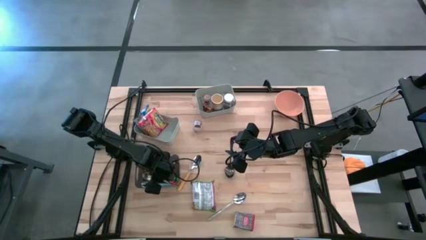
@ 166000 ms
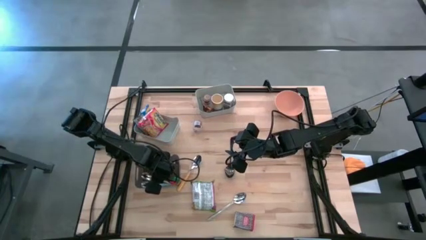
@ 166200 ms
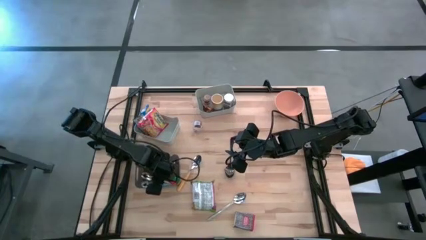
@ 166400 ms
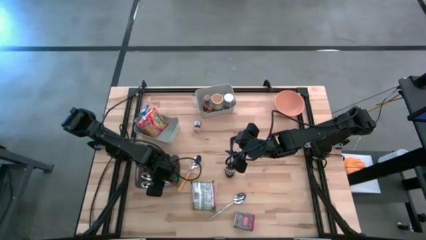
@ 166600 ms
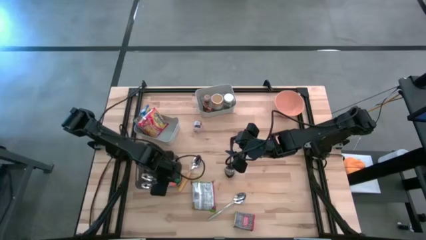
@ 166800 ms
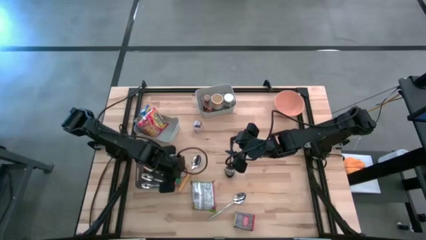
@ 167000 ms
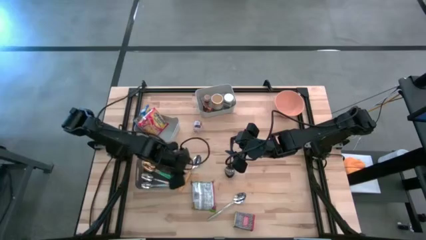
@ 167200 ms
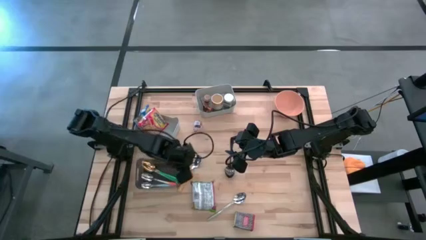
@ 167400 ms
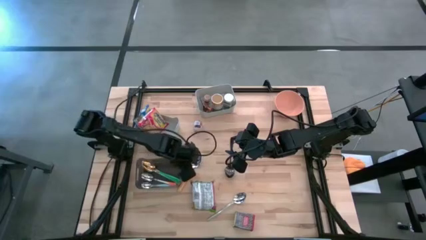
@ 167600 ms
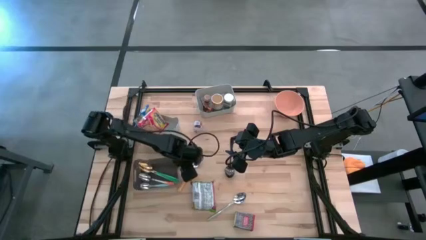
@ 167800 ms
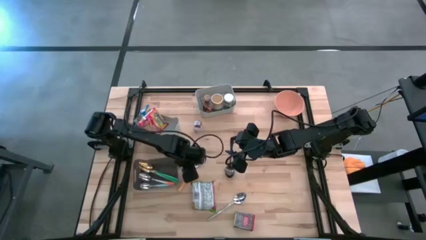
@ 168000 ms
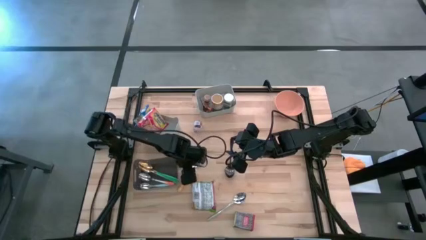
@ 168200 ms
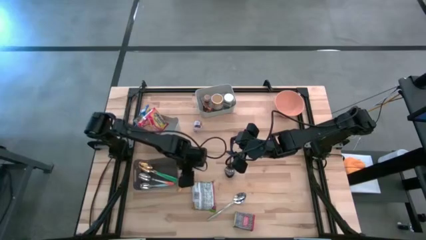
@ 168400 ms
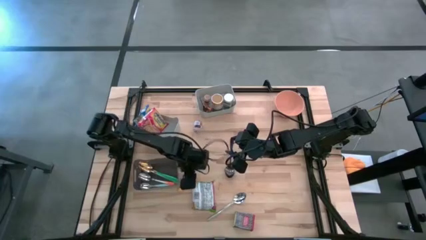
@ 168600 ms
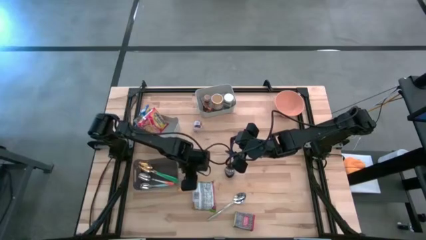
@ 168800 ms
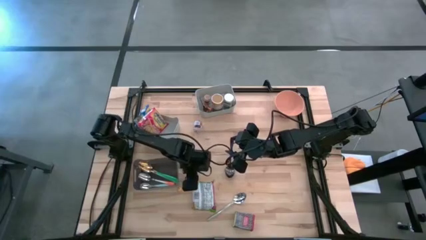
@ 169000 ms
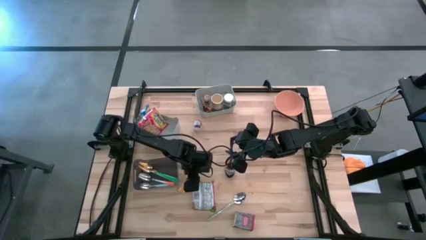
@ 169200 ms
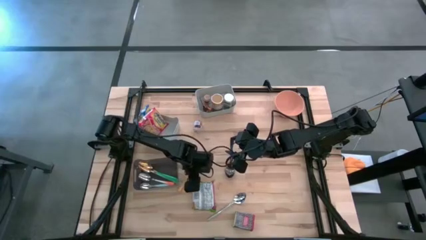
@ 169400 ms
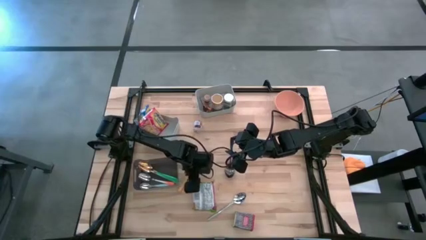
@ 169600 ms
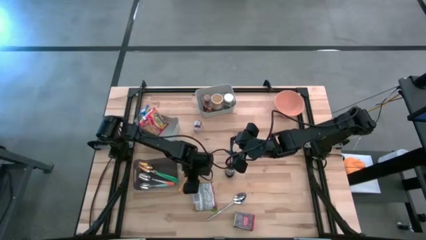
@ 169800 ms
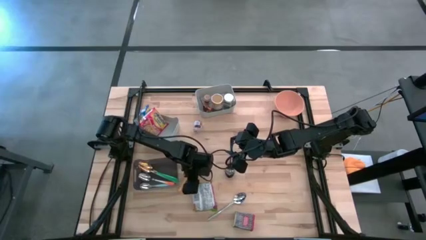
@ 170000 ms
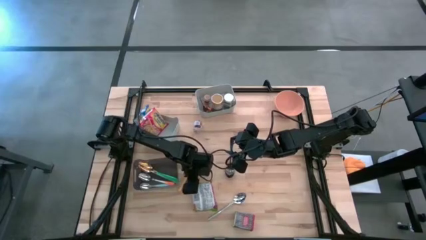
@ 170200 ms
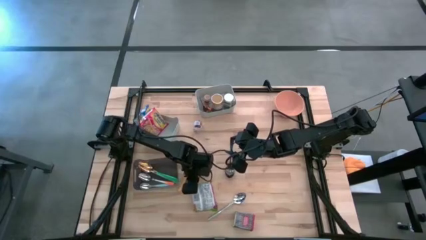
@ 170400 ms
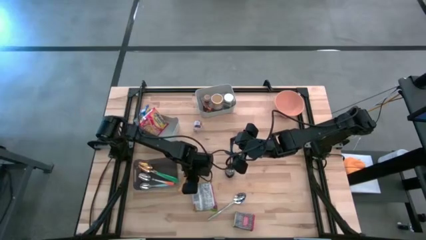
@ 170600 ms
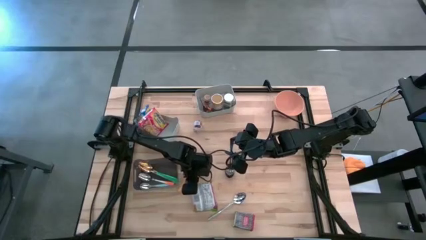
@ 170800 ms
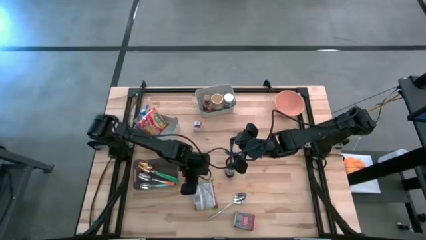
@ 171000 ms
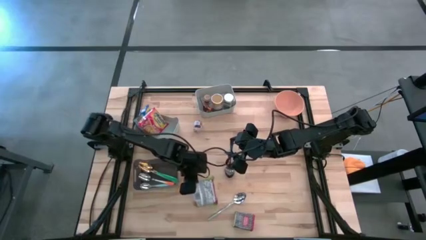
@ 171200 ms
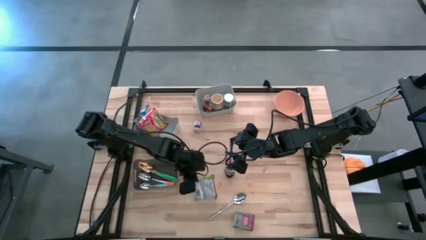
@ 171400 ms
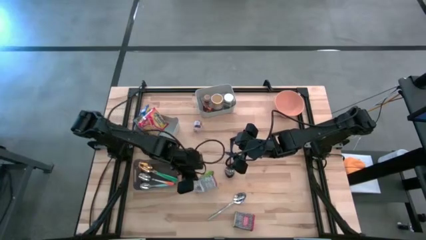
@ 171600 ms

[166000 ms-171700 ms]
Put the yellow noodle pack into the bottom gray bin

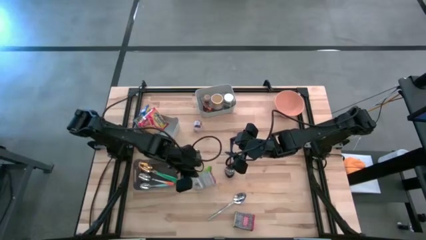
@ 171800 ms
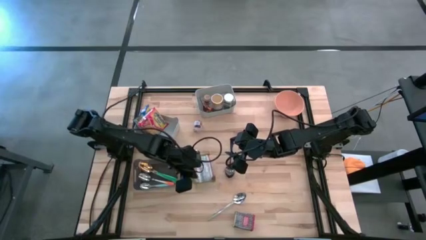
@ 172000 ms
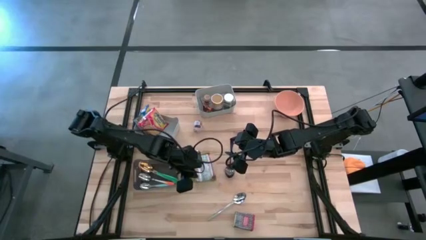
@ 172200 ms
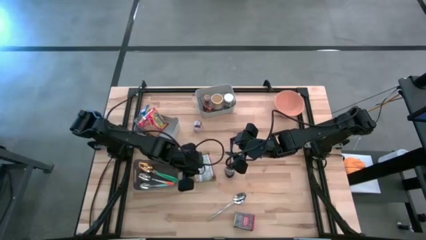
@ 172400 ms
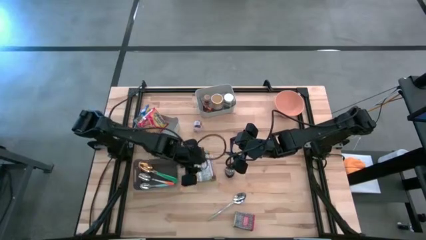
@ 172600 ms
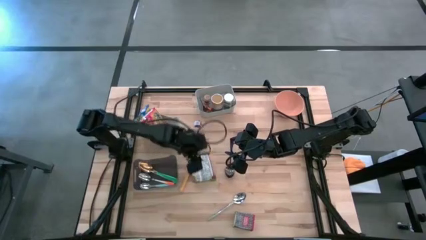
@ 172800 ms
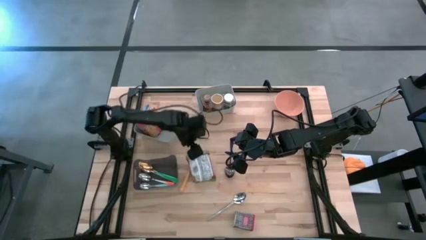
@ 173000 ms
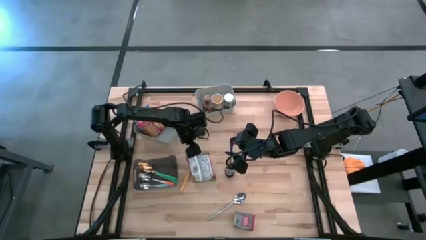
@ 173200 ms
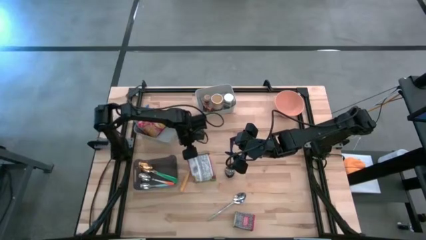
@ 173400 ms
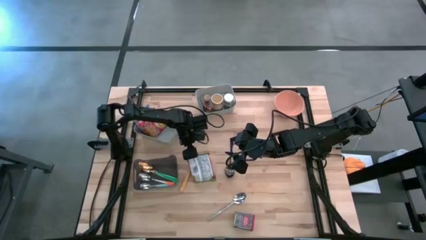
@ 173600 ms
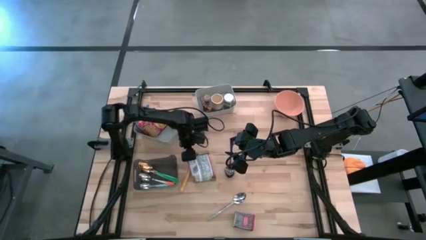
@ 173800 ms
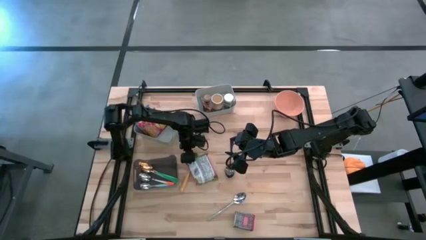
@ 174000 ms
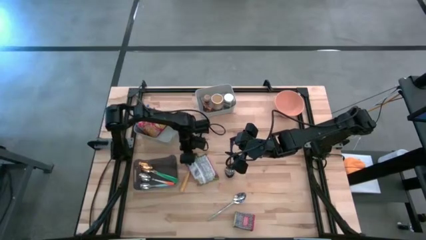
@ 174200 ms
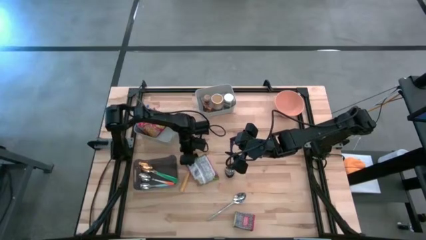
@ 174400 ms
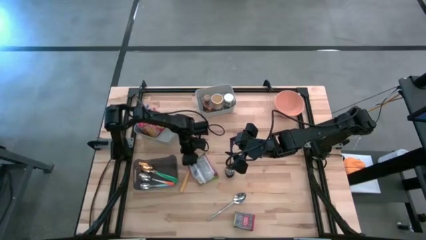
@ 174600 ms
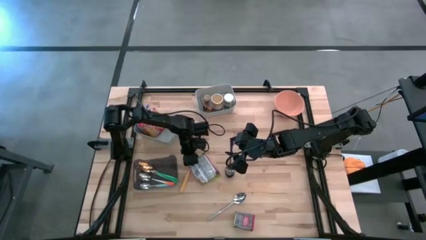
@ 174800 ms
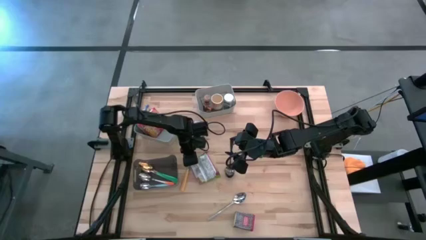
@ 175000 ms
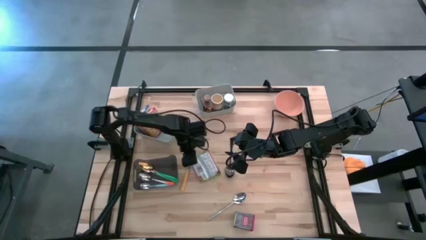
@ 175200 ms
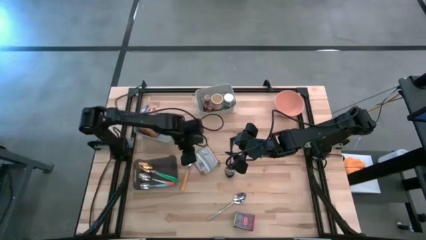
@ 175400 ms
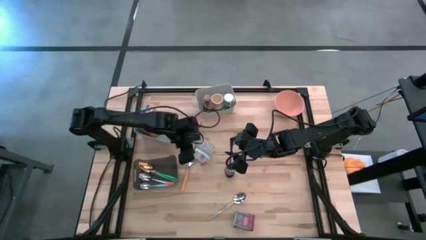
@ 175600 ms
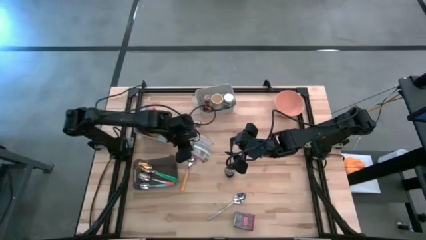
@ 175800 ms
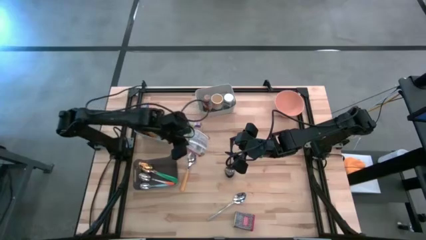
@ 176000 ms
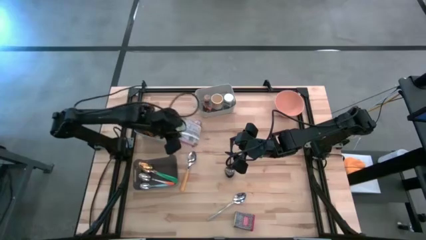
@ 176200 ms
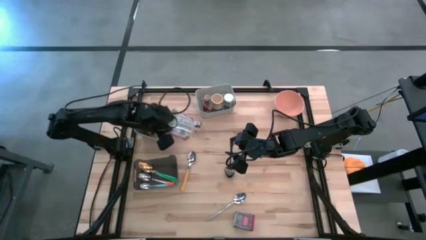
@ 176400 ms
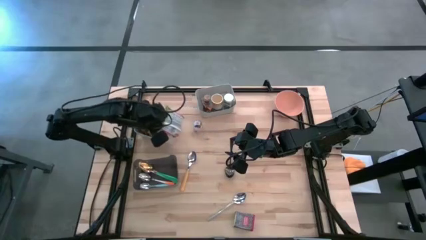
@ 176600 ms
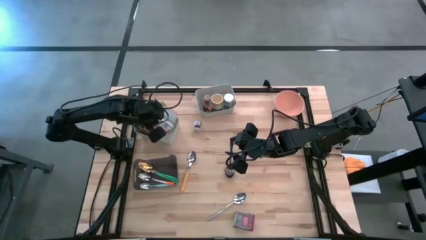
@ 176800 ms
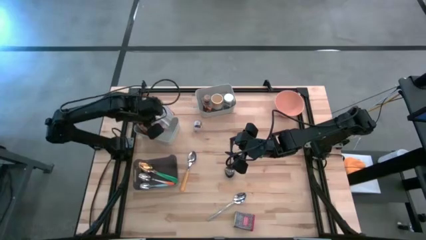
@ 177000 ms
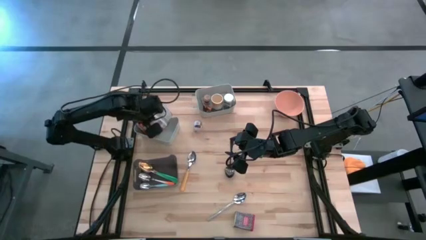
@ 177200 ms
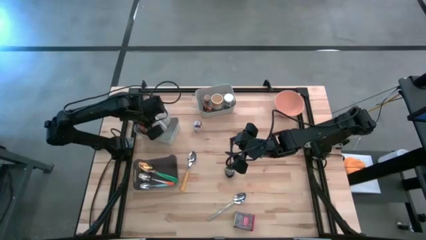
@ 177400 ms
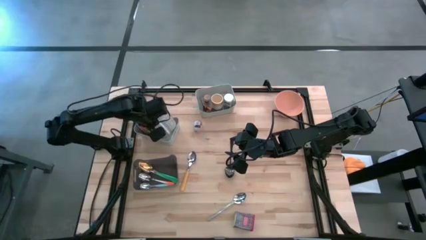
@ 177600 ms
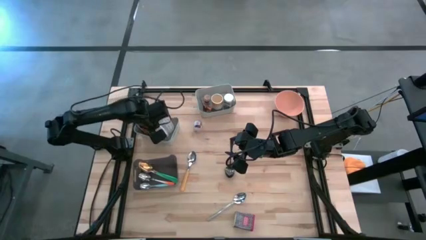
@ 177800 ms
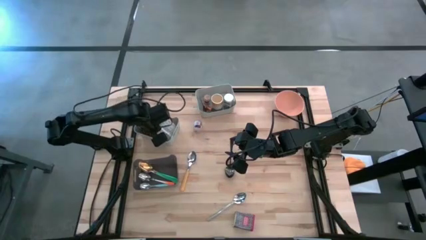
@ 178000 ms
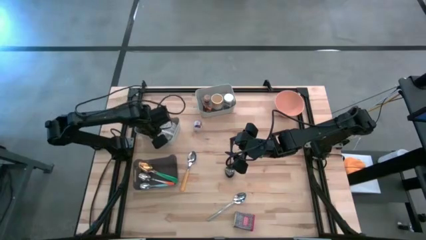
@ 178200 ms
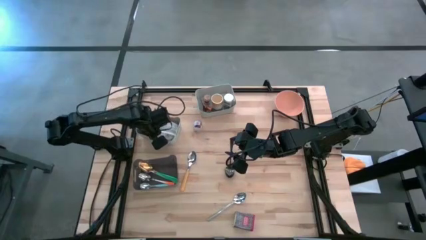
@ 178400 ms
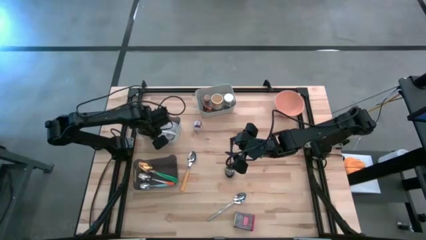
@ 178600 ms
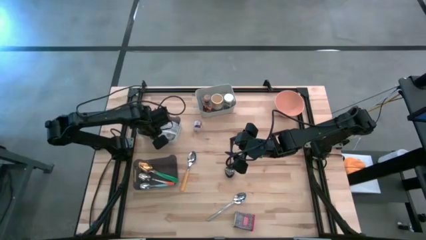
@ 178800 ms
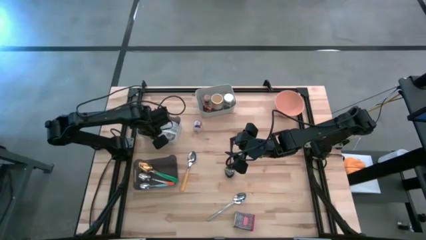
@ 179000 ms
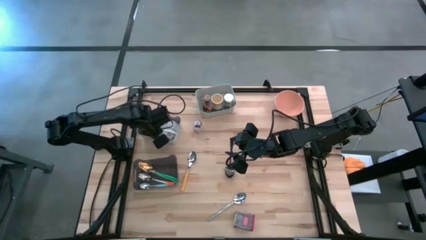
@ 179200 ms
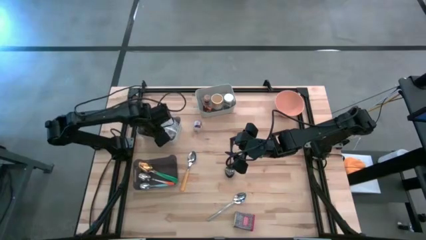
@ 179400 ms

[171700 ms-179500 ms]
Put the green noodle pack into the bottom gray bin

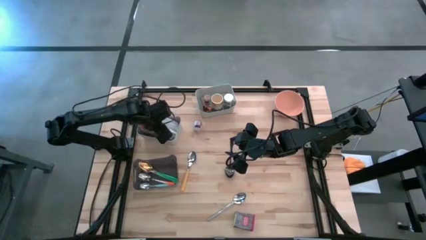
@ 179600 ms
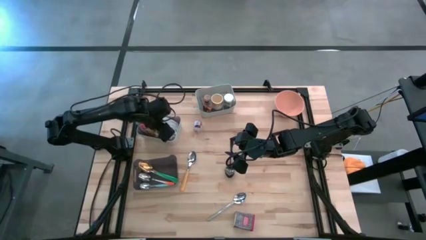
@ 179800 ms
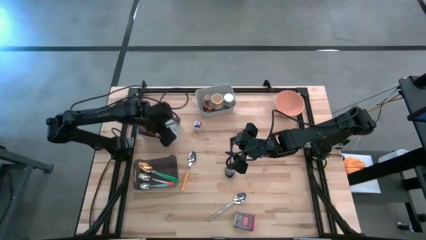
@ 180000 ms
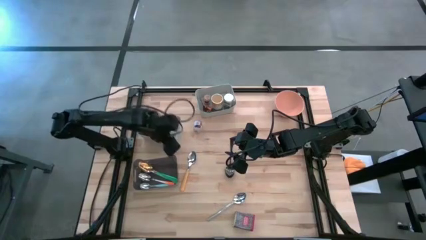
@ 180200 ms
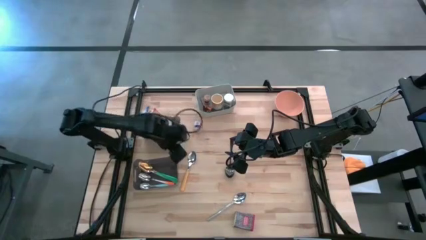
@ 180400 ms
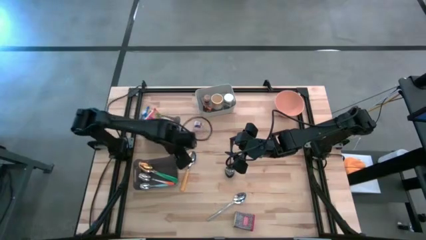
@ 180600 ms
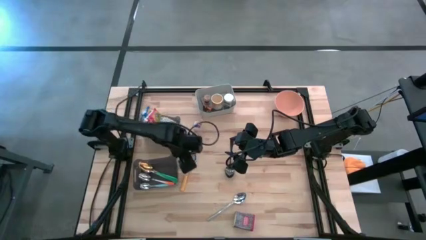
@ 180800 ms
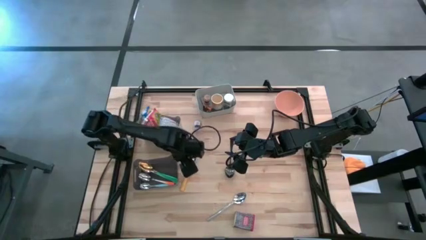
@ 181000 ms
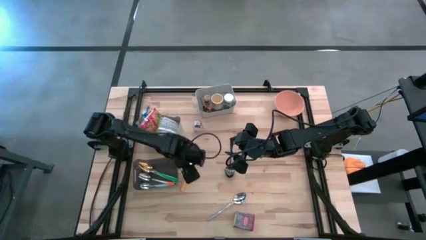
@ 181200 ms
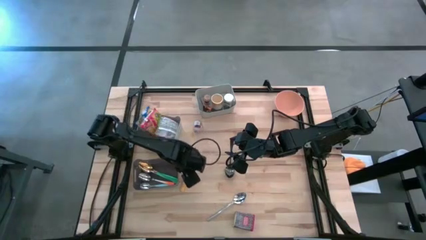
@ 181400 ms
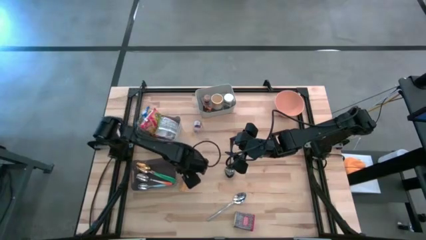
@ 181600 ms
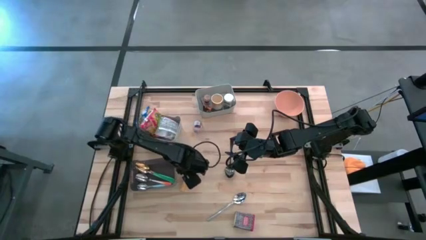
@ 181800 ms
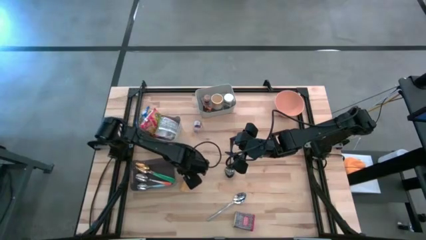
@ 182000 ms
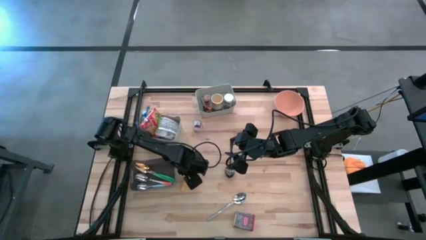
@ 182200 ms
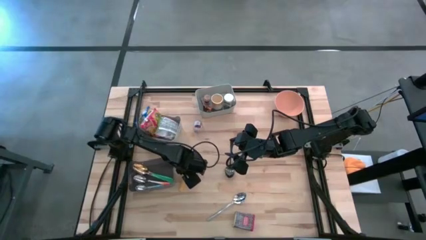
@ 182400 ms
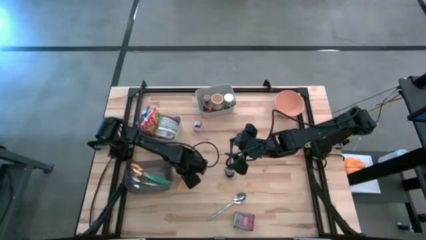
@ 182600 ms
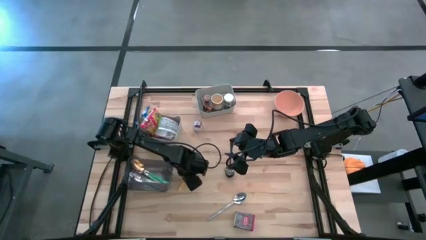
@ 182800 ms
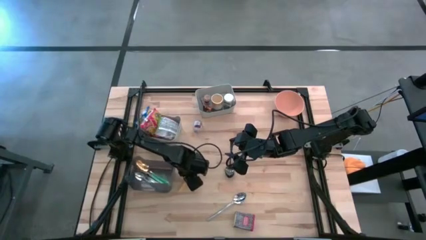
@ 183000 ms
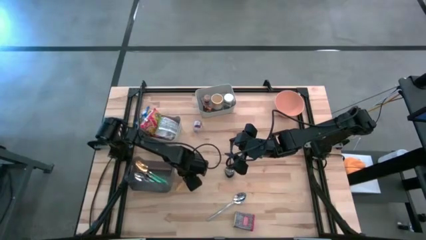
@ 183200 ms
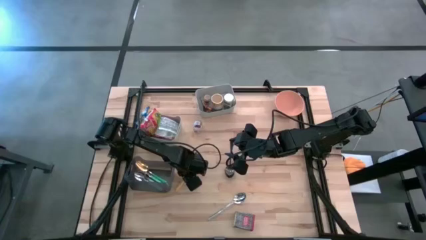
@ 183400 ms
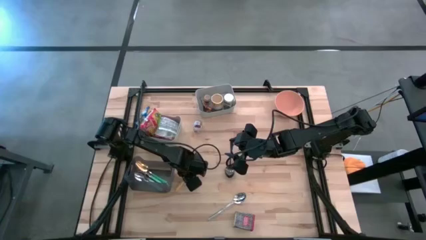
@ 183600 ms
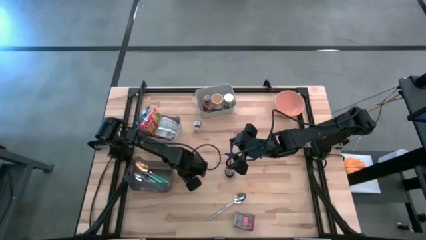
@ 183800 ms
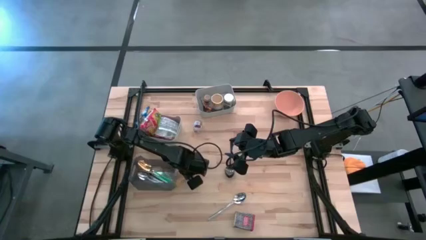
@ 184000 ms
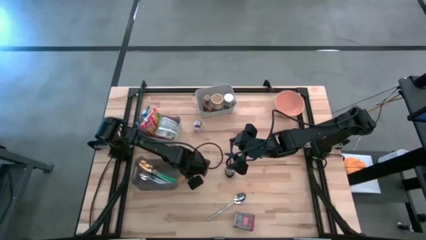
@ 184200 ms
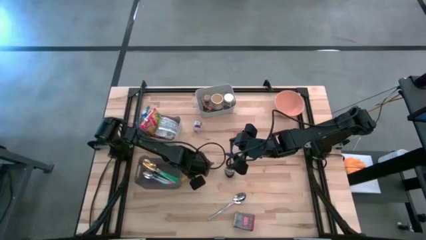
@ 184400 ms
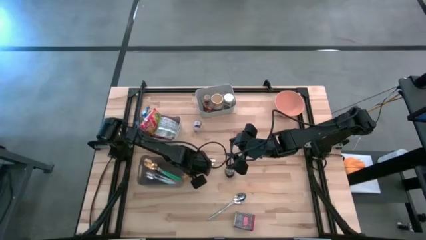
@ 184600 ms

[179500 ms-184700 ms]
Put the yellow spoon into the black bin
